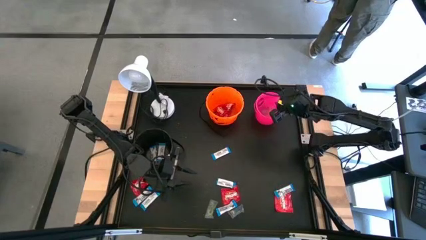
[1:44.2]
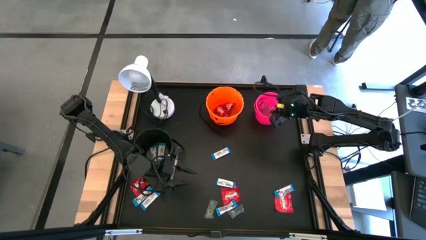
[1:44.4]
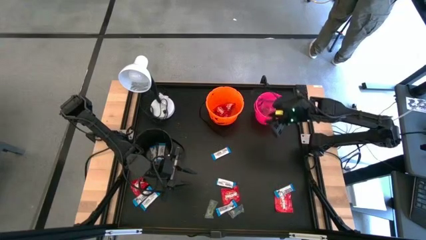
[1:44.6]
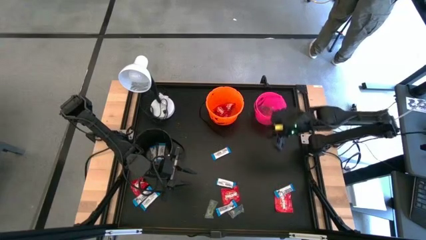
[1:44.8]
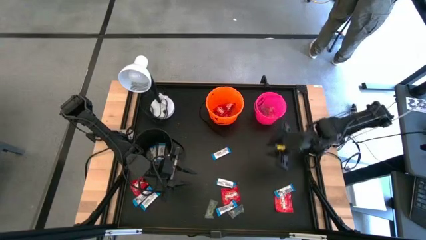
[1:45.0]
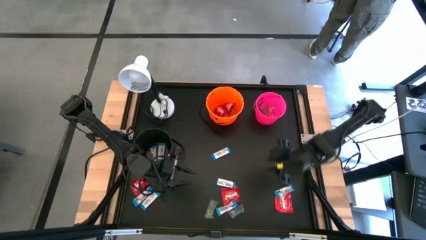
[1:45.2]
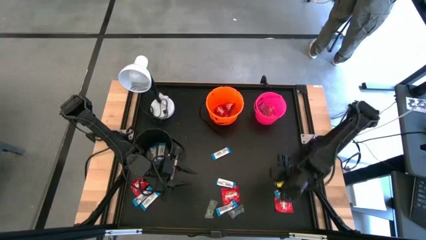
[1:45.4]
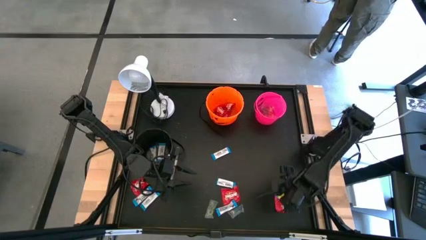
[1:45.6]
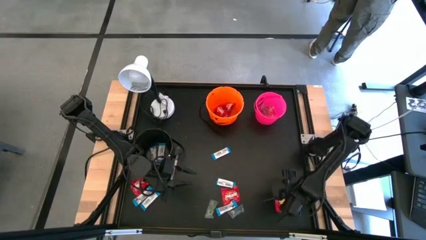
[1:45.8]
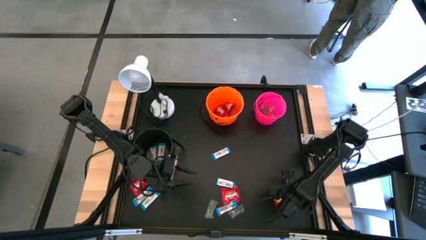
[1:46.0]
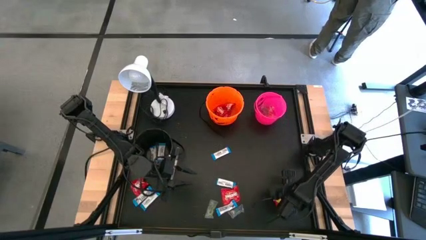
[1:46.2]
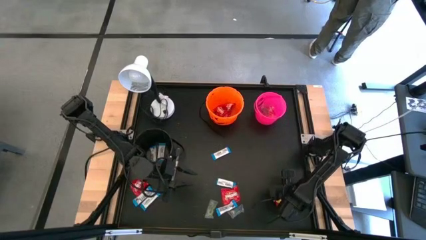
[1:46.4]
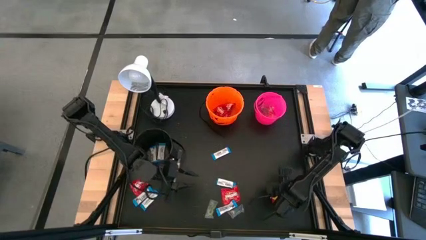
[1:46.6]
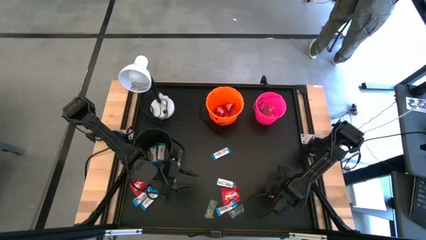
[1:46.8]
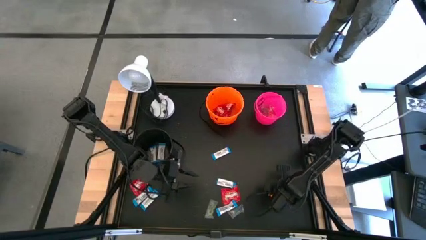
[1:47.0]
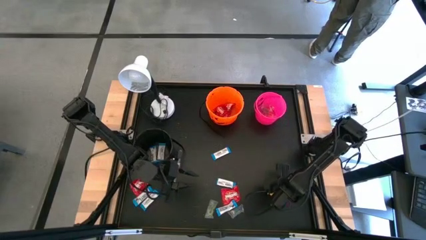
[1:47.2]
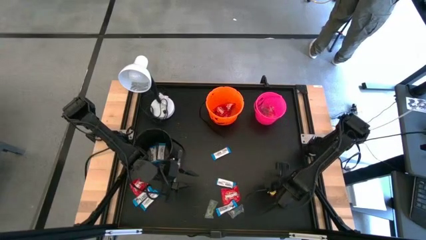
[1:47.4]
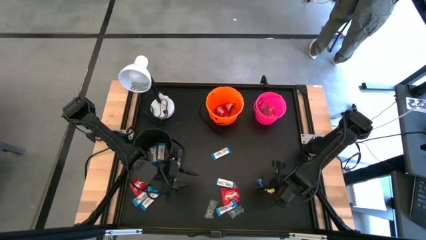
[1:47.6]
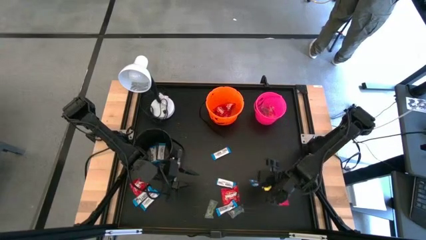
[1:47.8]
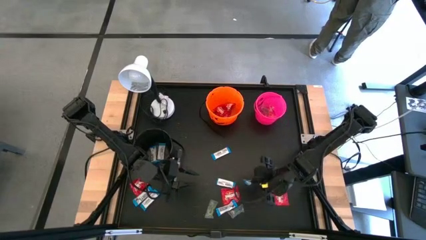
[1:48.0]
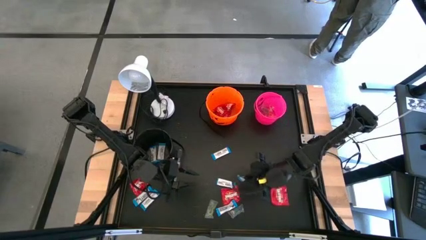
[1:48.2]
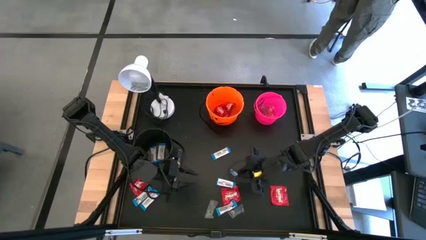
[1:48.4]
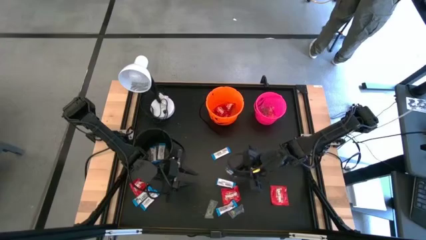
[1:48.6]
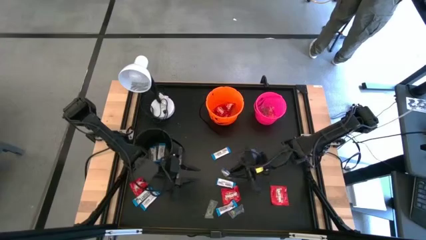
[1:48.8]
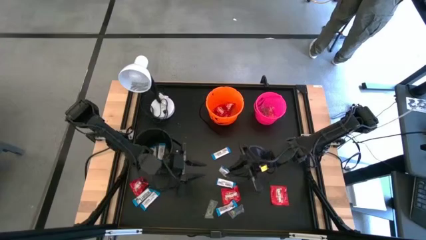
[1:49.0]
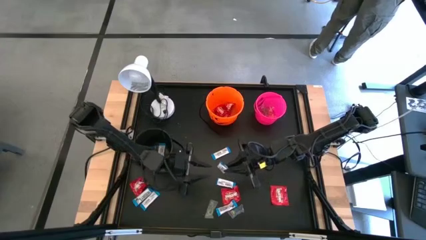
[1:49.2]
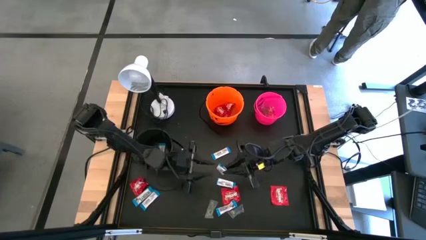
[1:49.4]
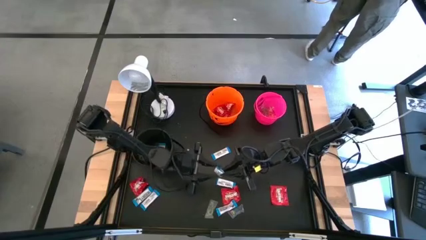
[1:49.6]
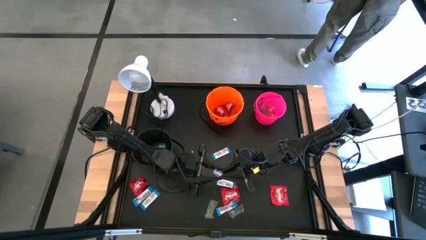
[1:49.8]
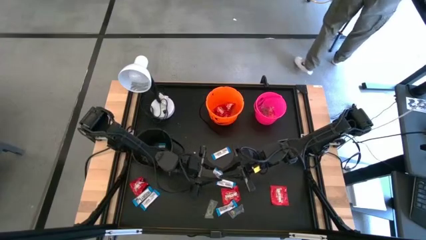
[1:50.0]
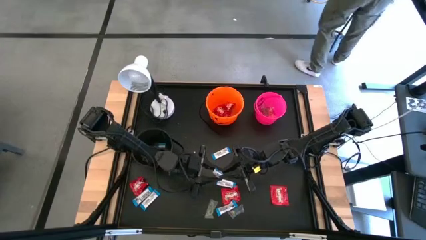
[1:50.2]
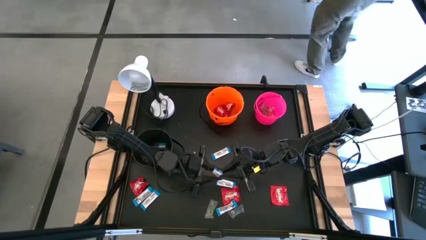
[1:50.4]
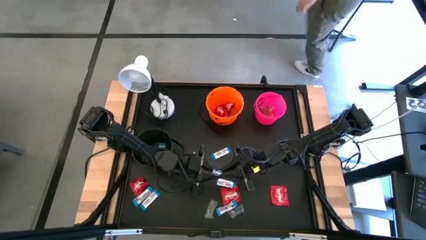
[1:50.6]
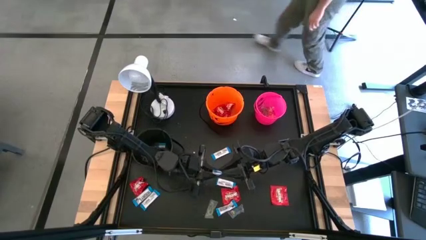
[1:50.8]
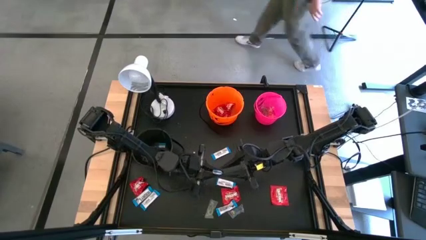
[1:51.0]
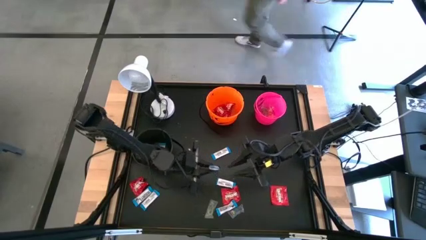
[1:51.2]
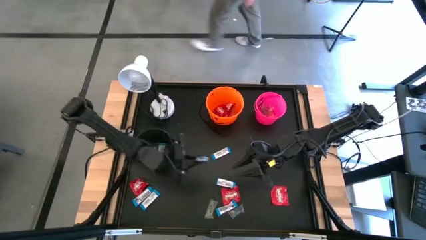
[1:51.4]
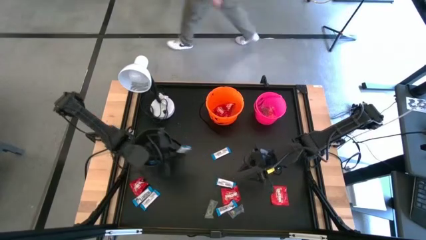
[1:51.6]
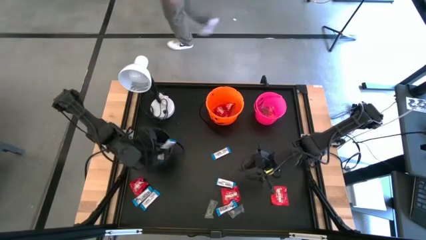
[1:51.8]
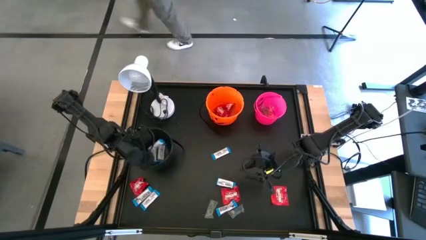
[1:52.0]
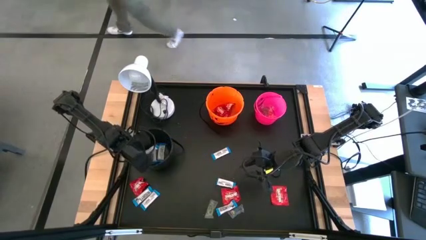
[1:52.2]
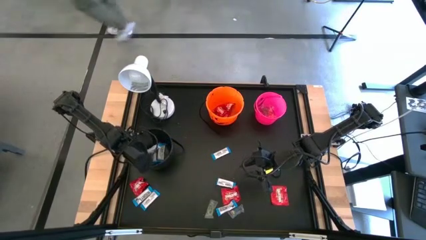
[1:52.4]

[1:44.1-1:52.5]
Task: Sort candy
Put the white candy into the black bucket

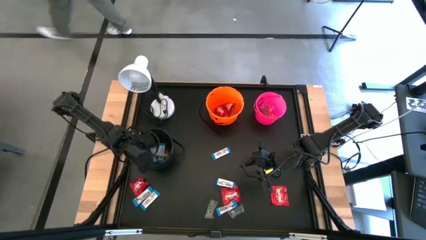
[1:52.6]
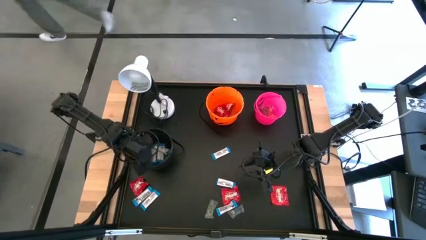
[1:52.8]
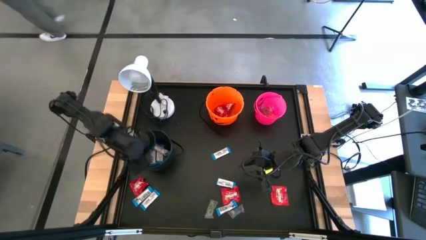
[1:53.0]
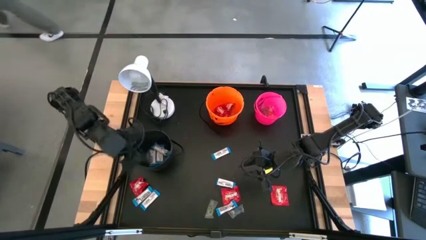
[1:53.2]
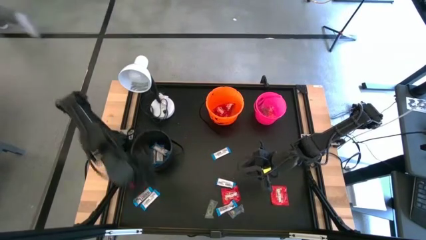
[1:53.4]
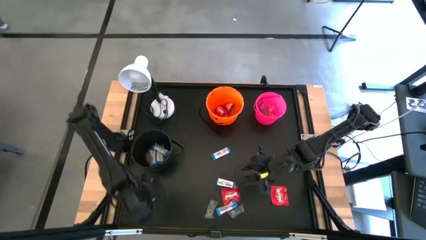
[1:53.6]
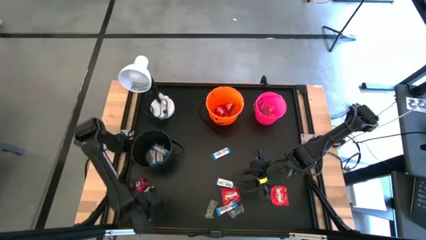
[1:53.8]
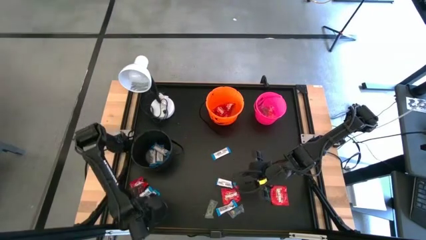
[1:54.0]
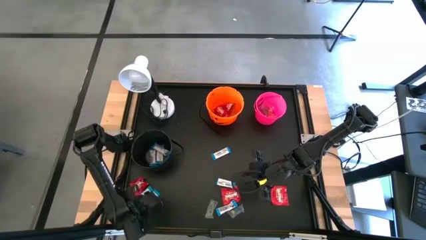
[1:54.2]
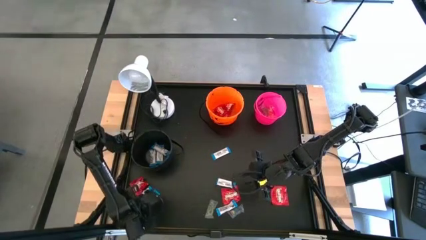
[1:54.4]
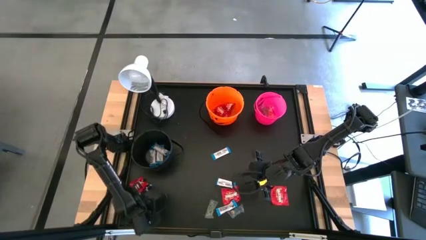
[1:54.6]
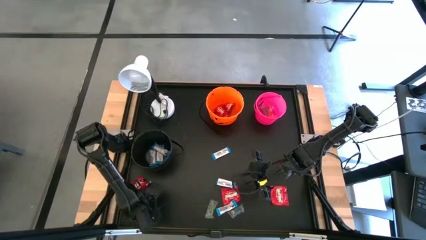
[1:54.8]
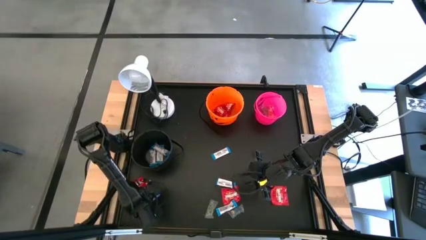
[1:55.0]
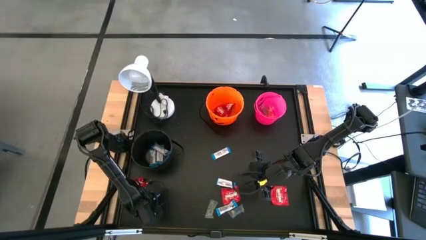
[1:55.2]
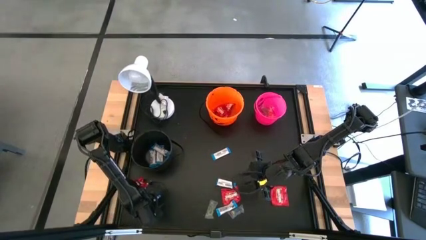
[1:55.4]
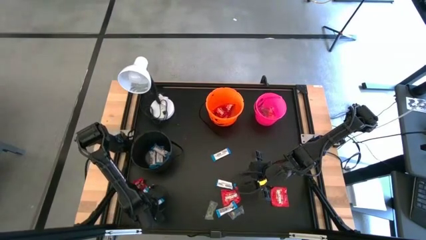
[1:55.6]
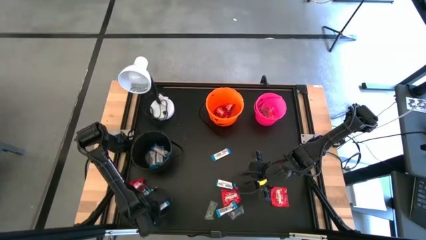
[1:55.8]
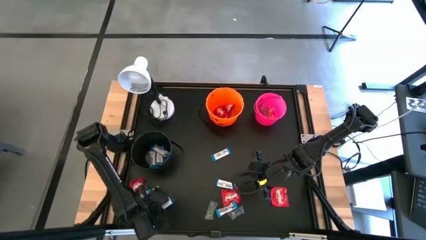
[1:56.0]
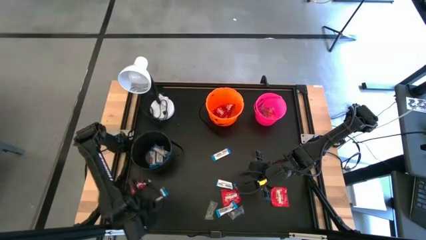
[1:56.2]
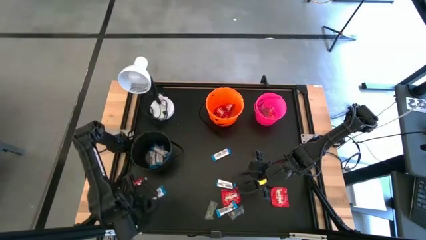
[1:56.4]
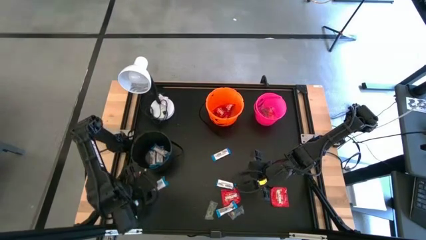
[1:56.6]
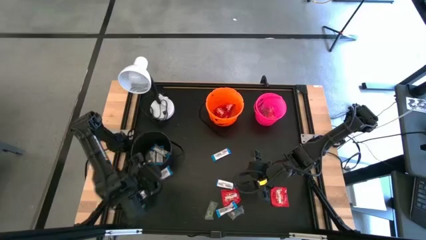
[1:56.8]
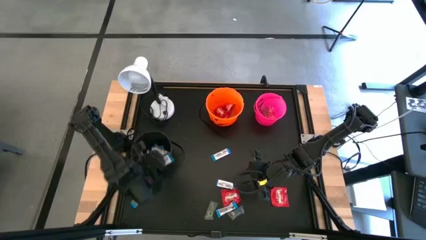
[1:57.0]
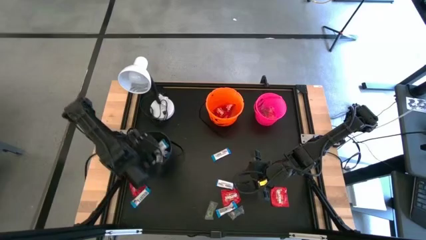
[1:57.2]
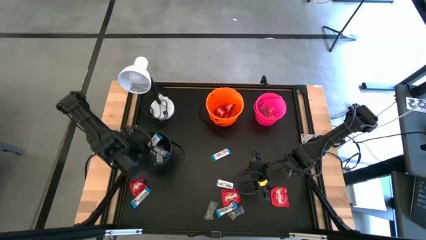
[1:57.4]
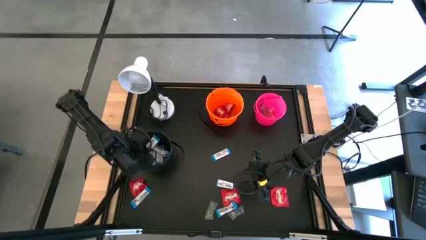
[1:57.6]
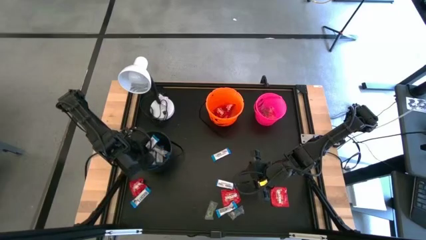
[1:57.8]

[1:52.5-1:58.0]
Put the white candy into the black bucket

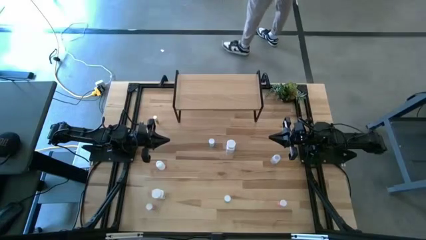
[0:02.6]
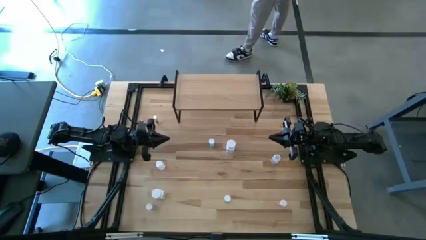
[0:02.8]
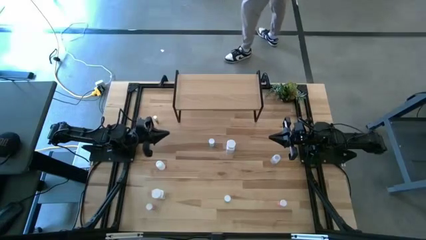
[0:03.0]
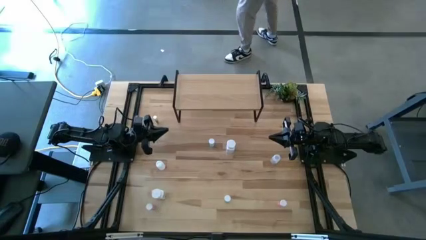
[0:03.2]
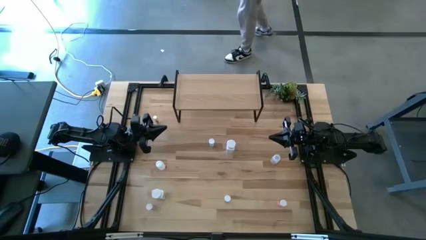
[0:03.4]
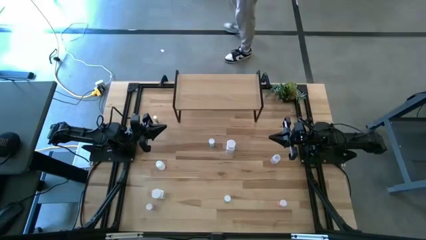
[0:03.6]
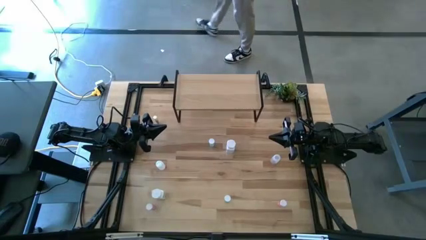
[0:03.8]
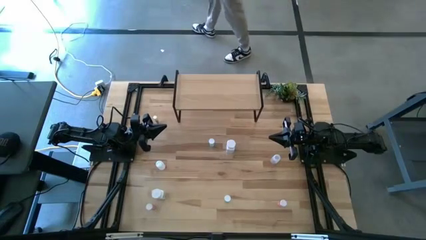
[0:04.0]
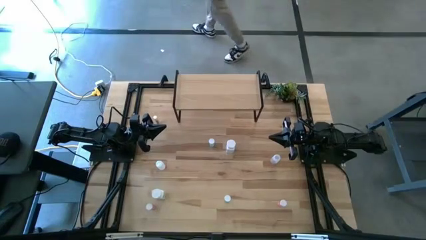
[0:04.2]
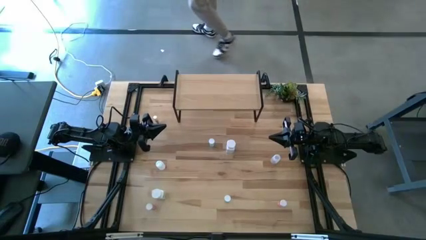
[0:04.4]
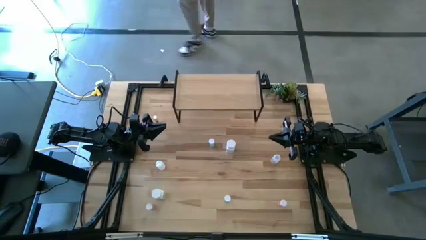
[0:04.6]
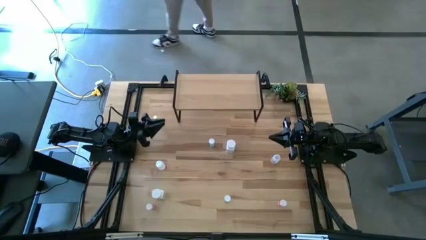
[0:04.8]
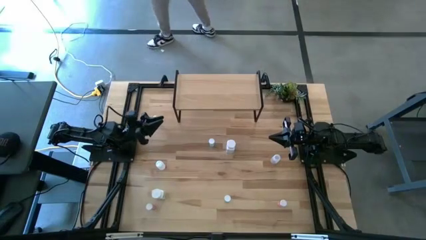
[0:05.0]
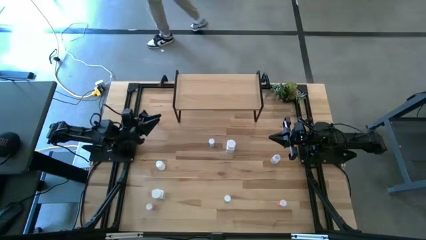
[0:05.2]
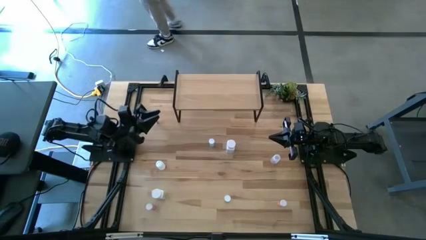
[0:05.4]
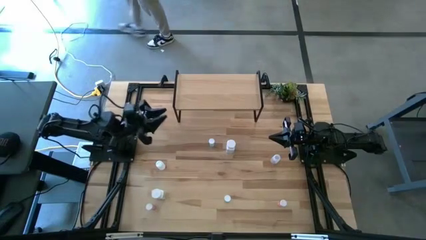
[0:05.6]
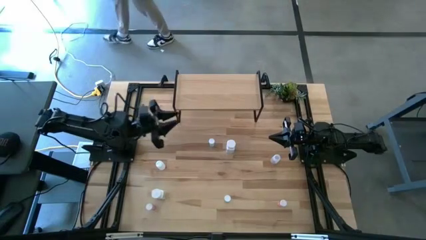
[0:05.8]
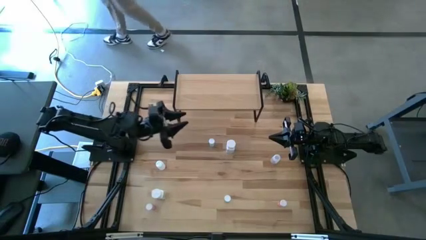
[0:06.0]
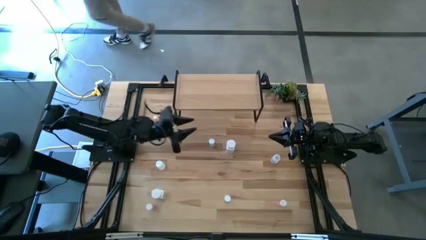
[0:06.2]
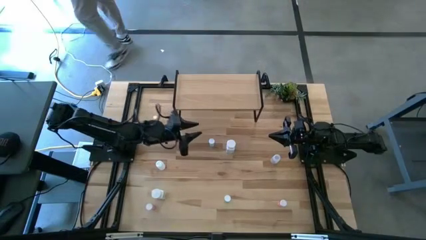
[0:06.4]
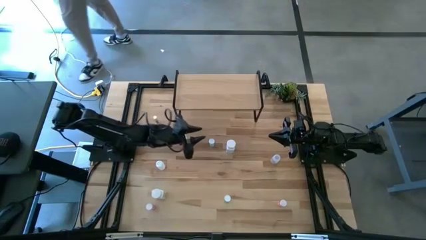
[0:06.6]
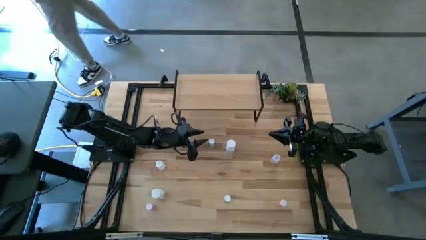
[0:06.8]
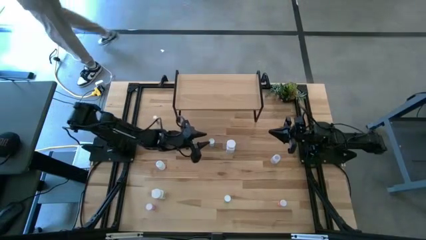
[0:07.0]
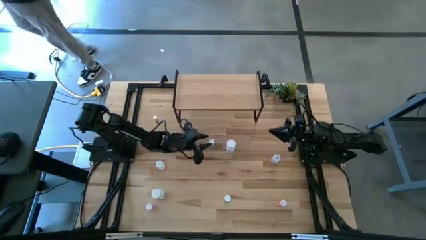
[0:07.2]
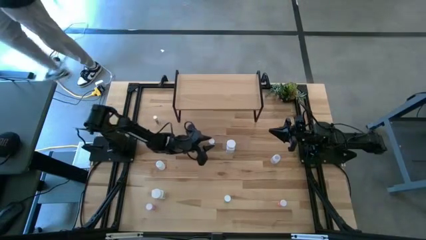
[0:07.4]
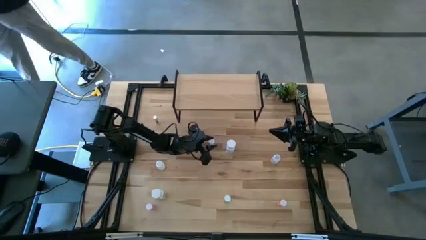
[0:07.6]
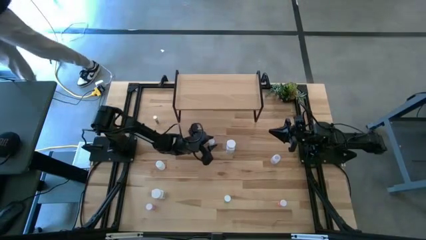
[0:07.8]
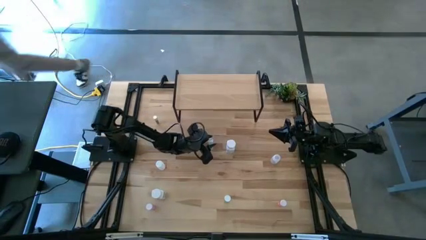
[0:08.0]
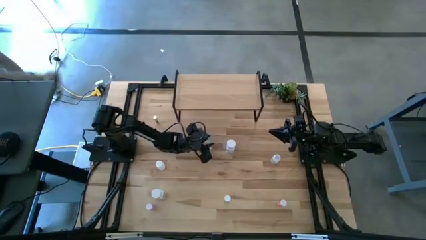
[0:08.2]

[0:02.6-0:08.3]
Task: Pick and place medicine bottles onto shelf by color
Put the top blue pill bottle on the shelf
